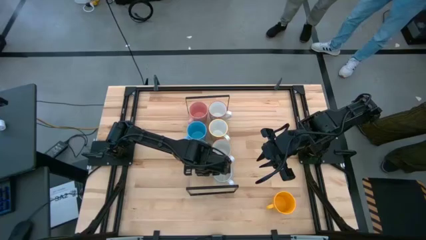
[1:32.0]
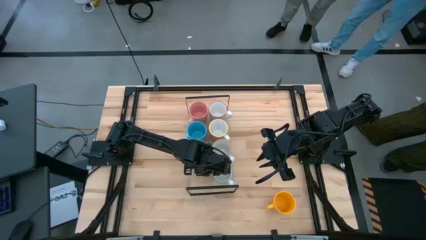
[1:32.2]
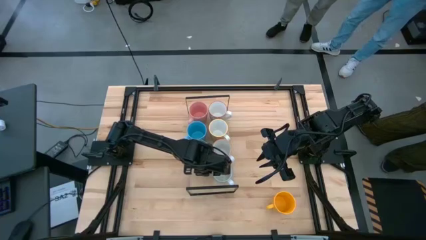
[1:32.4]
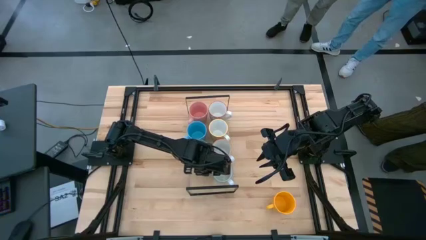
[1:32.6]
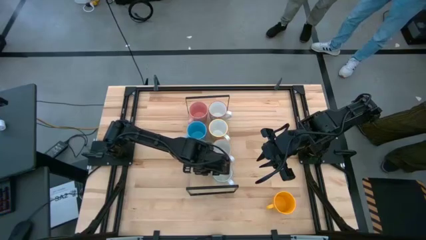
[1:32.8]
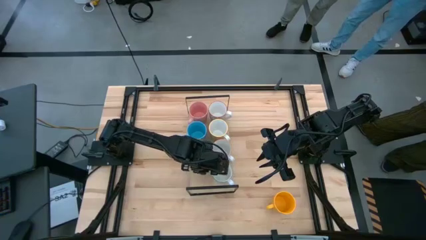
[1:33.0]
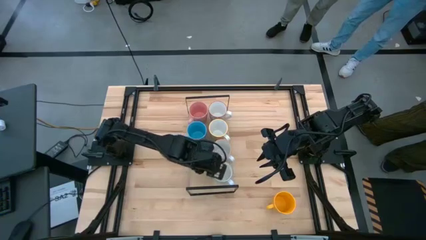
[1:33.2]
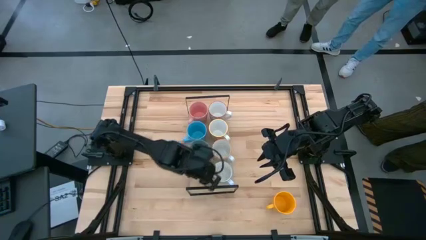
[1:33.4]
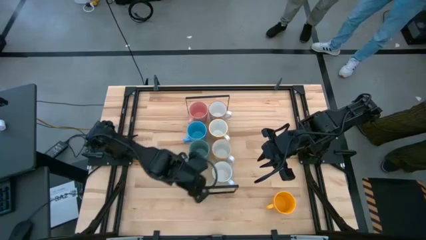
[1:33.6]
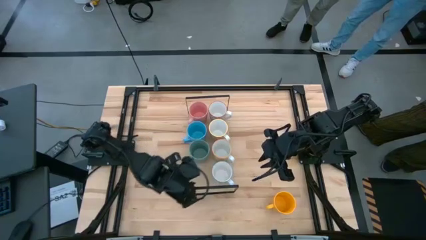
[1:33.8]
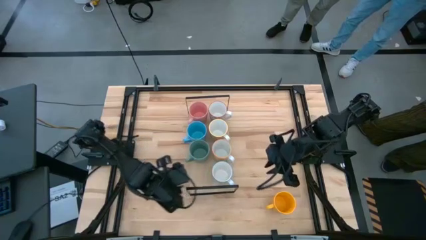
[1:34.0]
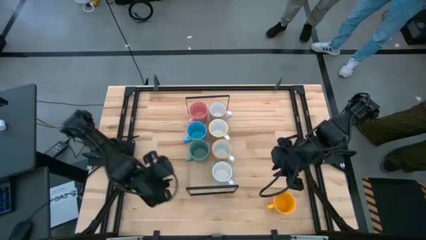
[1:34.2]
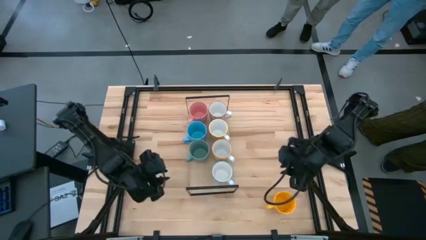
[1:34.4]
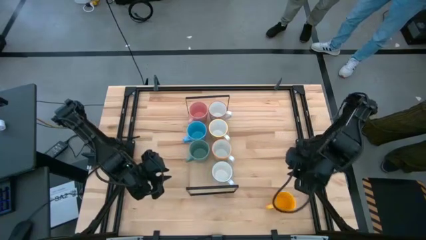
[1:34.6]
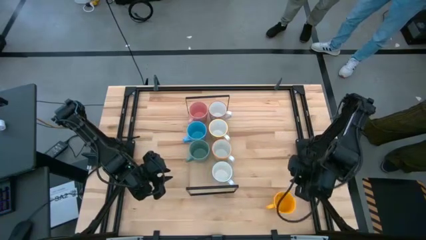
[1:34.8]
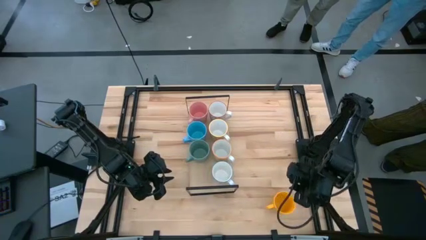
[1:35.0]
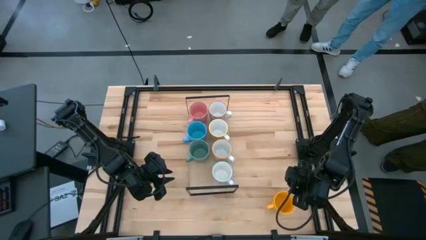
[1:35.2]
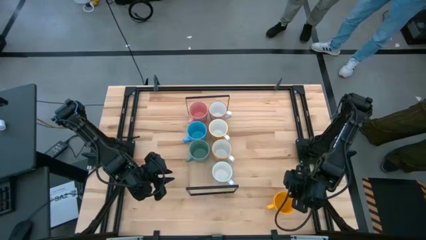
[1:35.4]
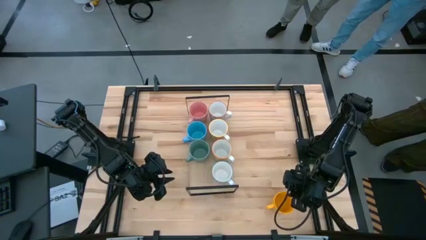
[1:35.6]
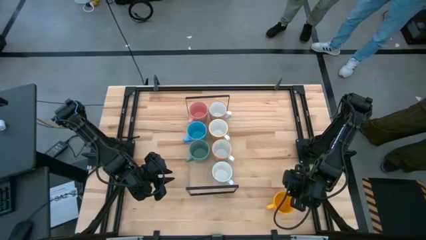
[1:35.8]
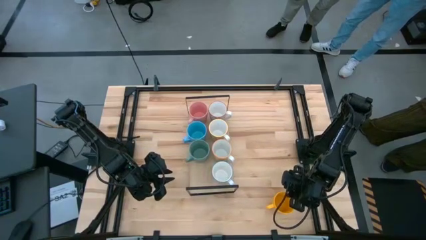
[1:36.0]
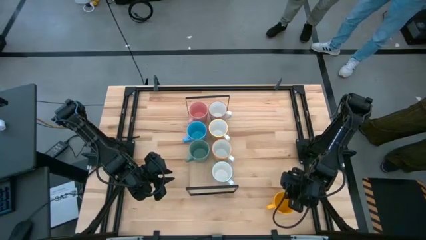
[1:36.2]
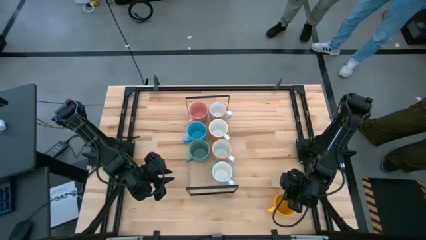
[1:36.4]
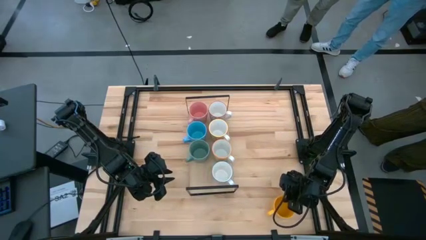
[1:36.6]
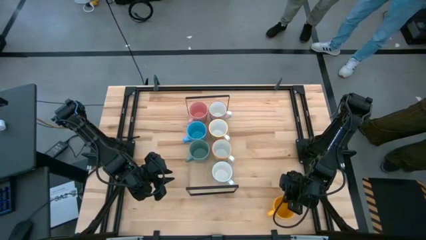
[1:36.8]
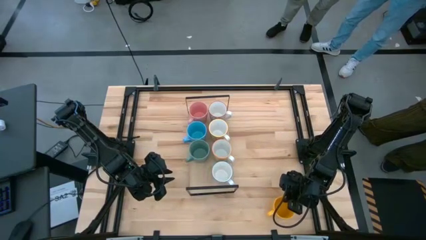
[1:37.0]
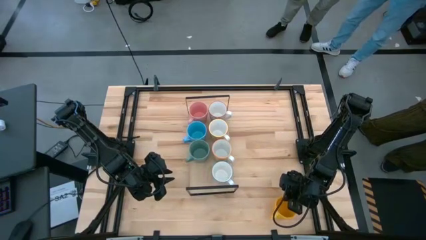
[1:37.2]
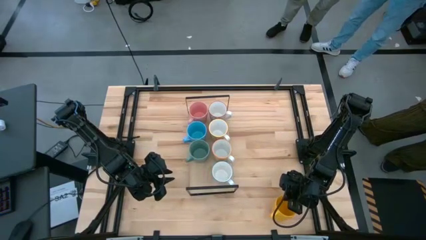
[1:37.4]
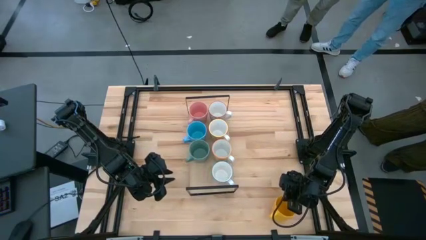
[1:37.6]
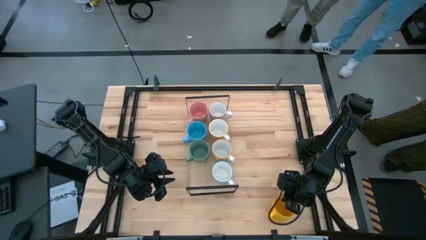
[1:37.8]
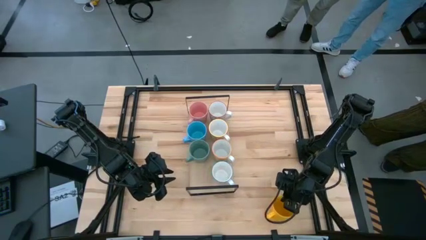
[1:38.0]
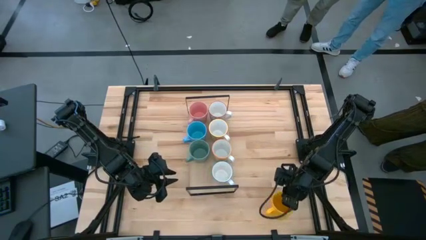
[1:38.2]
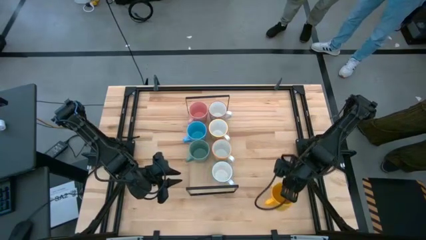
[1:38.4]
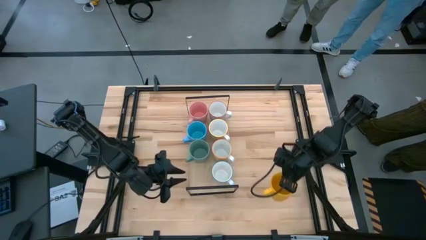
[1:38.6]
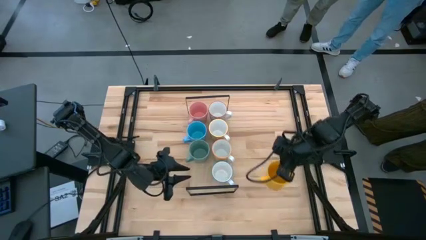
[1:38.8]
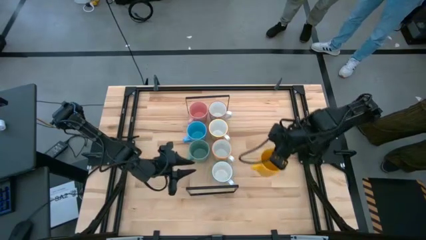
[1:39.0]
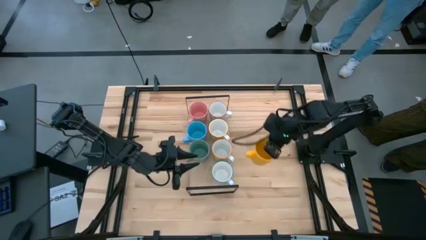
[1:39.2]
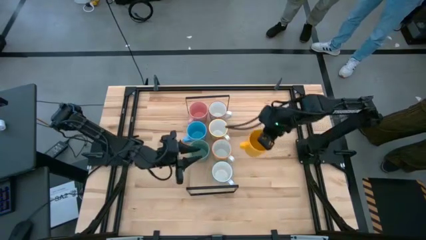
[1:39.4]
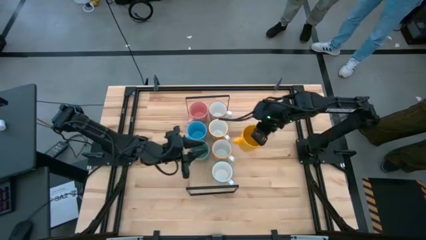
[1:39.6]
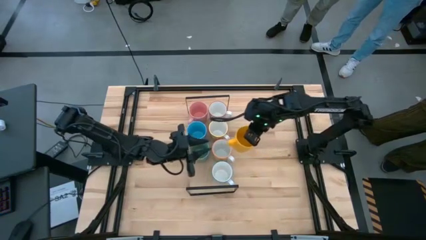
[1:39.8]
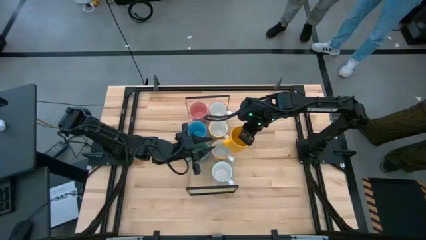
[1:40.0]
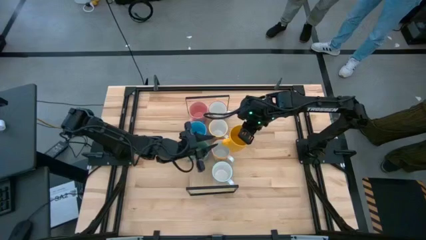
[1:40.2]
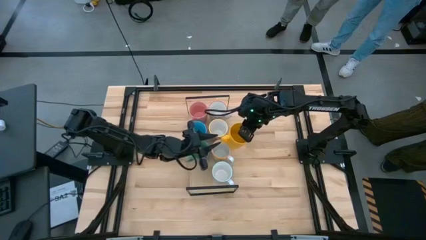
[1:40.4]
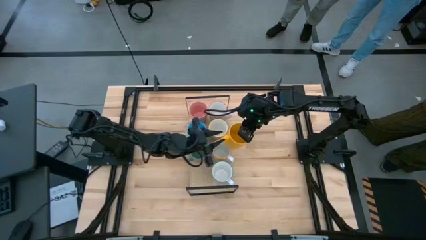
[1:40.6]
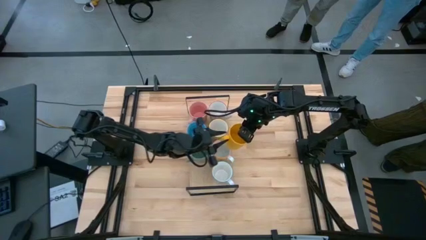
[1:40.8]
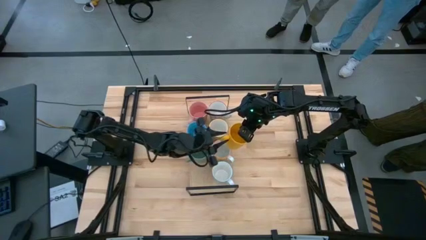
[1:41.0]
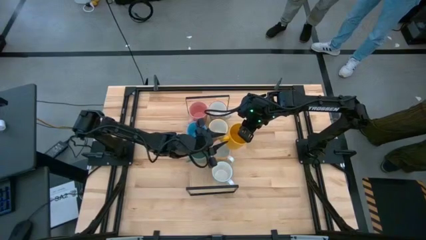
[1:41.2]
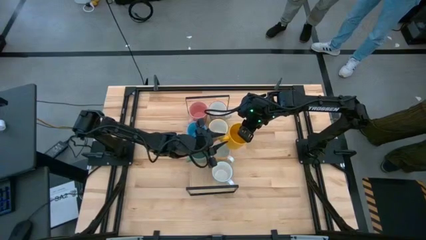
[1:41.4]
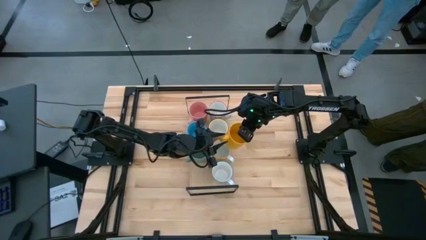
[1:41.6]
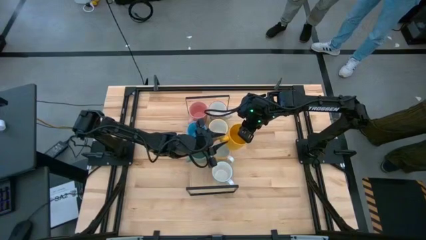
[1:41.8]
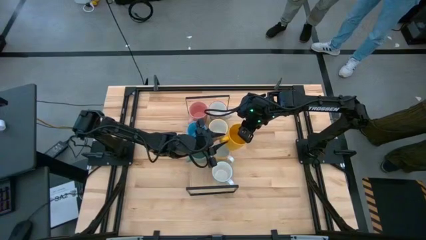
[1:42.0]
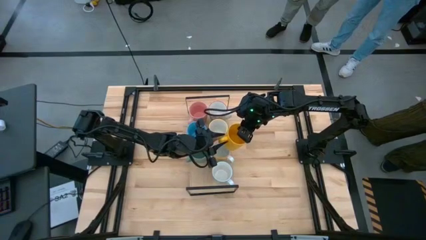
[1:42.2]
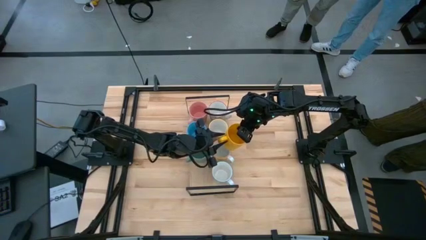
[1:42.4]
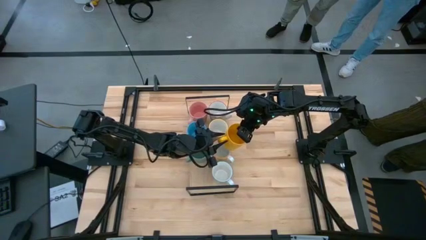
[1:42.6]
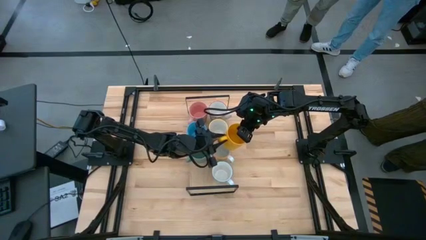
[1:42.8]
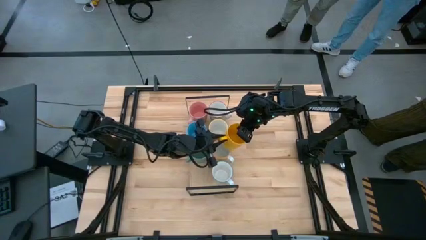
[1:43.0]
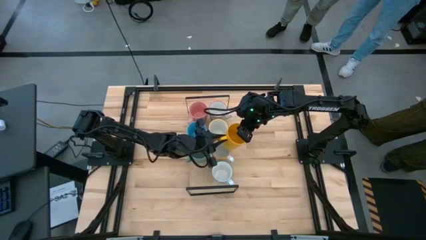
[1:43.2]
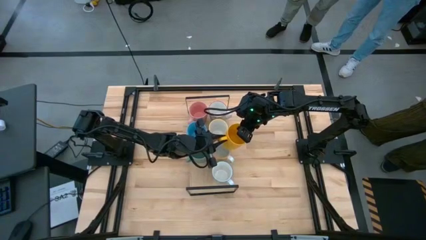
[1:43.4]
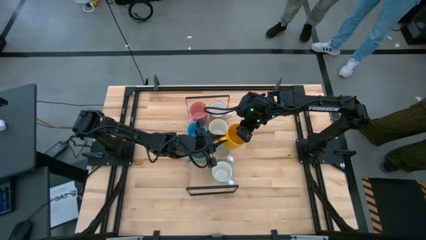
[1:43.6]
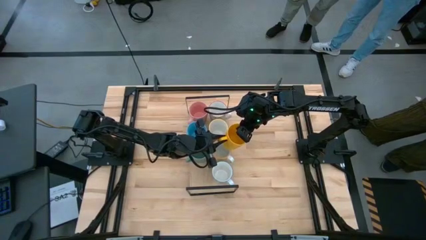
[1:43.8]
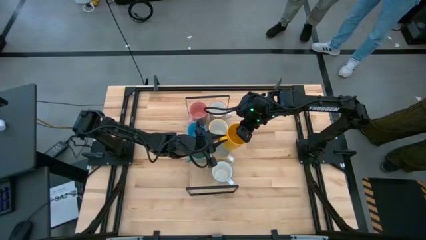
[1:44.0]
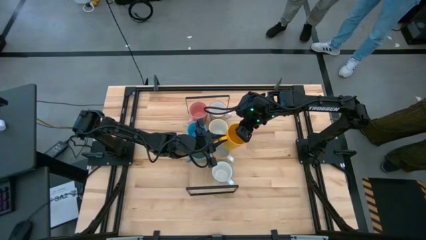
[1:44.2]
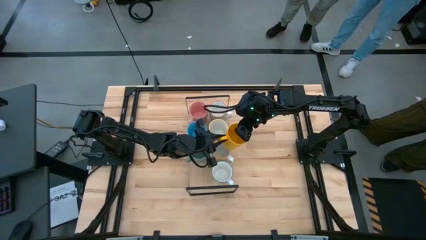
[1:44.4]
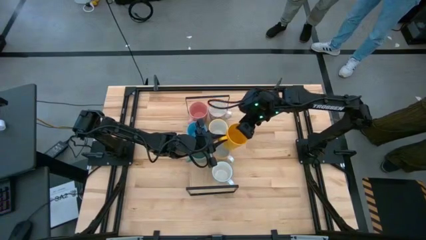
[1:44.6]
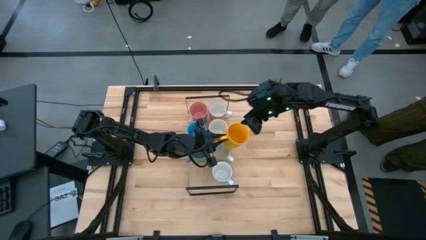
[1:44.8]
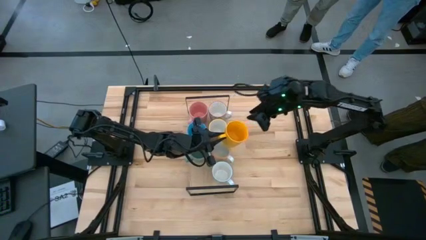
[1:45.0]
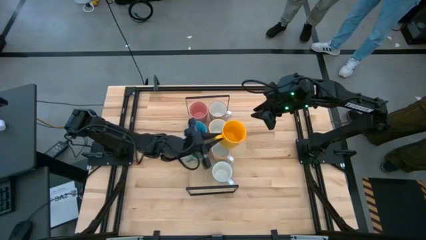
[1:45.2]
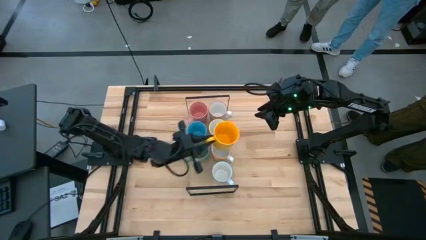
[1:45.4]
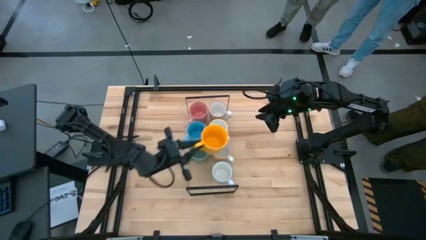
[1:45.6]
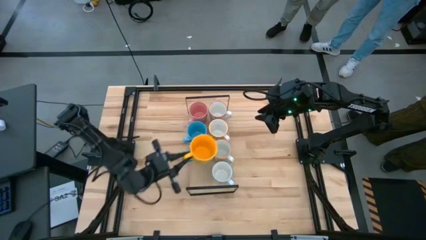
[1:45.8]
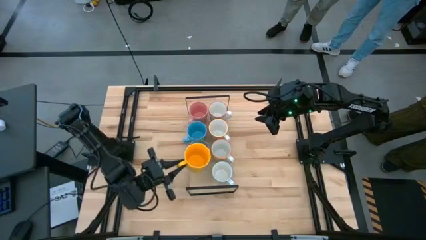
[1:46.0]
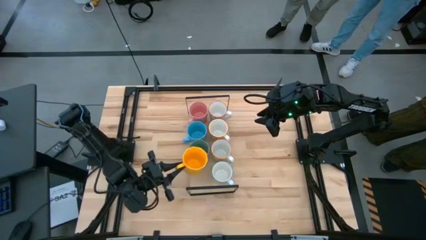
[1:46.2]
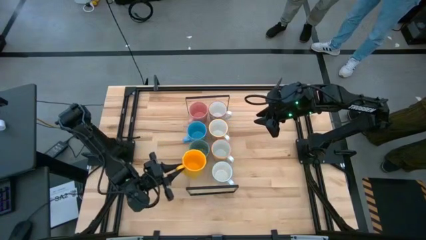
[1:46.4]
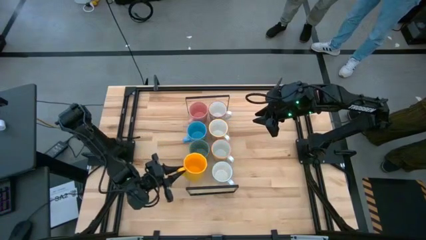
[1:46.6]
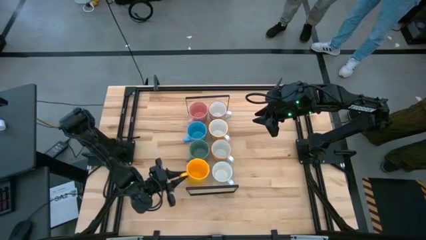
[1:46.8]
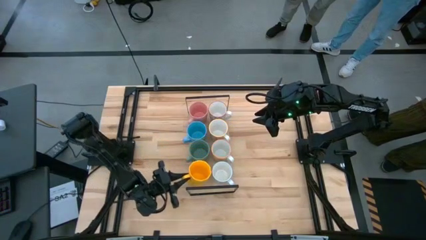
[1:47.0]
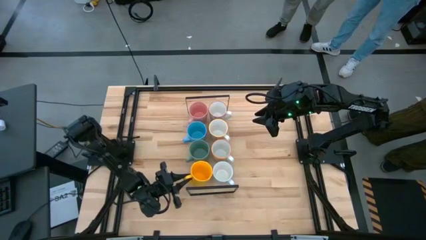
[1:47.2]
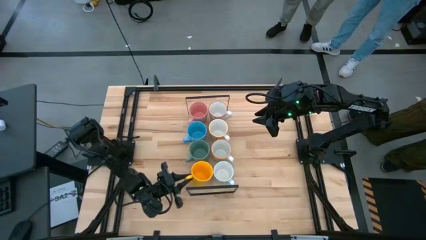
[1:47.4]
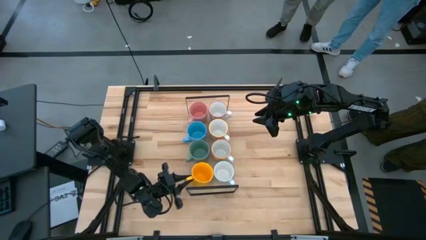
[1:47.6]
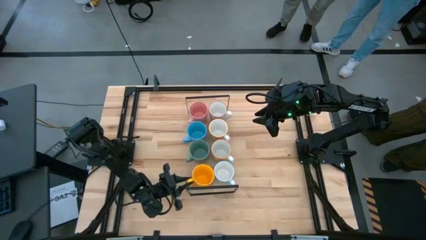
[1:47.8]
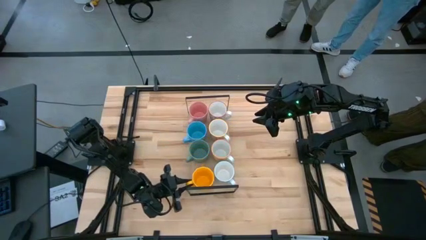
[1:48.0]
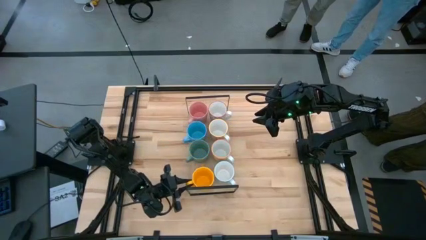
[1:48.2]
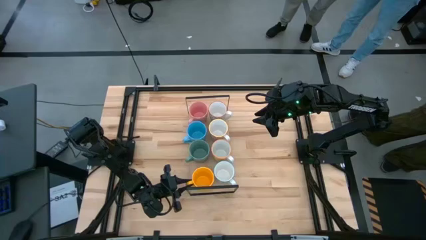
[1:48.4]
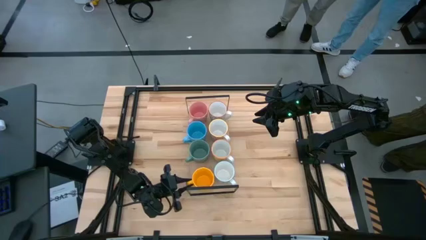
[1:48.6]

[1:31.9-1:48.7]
Task: Place coffee mugs
Put the yellow mug on the shelf
